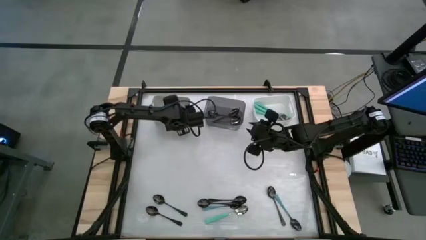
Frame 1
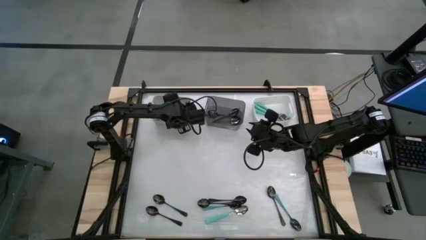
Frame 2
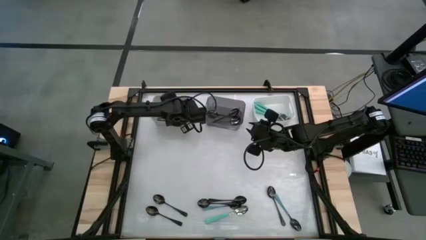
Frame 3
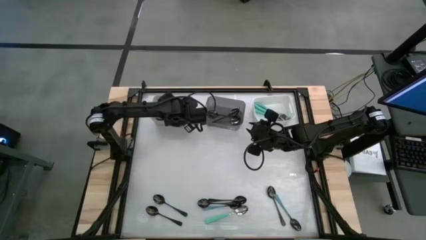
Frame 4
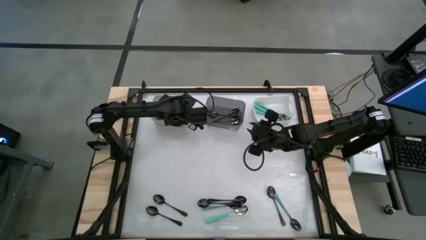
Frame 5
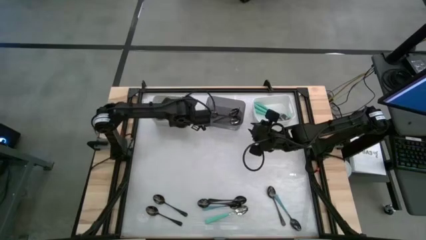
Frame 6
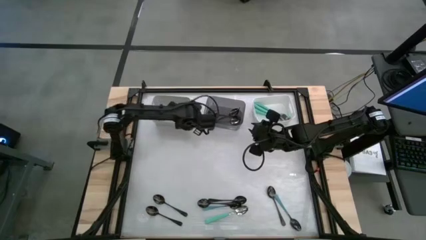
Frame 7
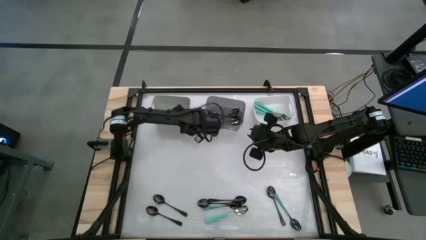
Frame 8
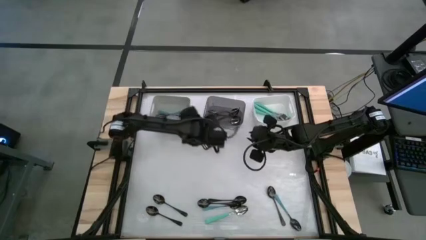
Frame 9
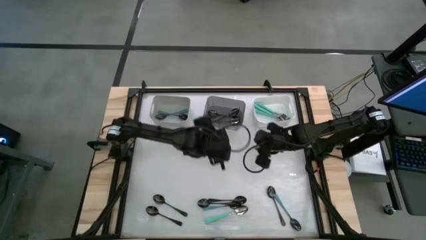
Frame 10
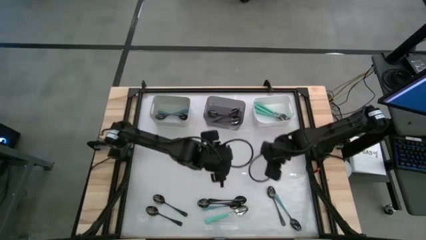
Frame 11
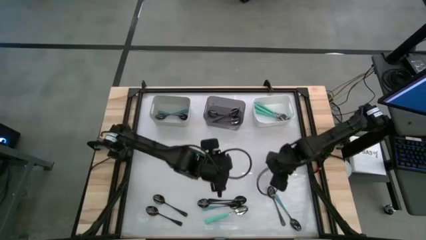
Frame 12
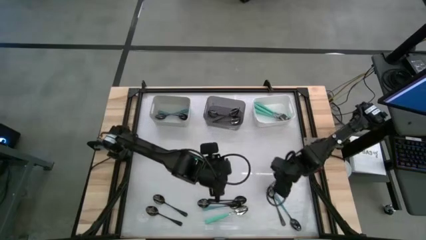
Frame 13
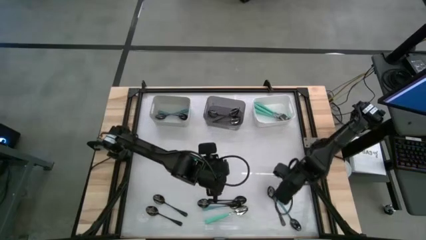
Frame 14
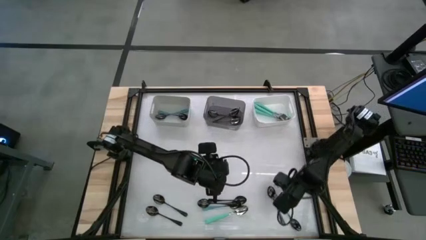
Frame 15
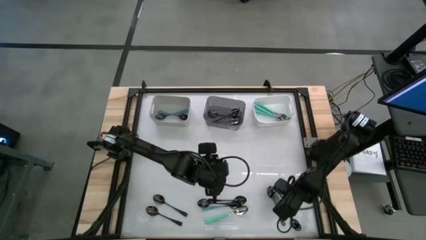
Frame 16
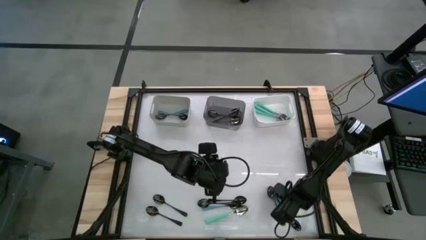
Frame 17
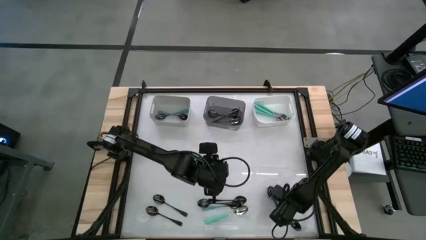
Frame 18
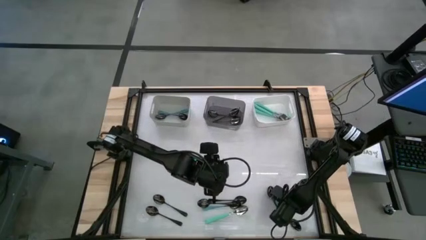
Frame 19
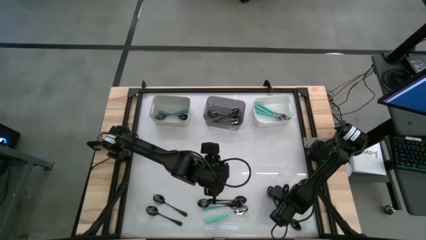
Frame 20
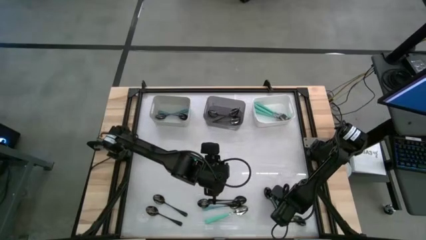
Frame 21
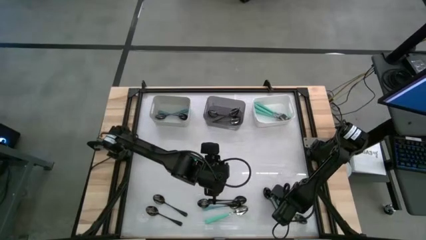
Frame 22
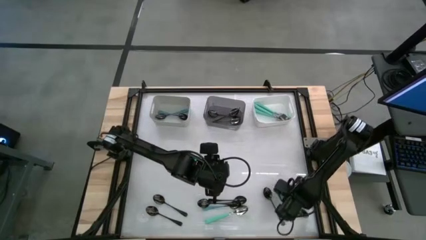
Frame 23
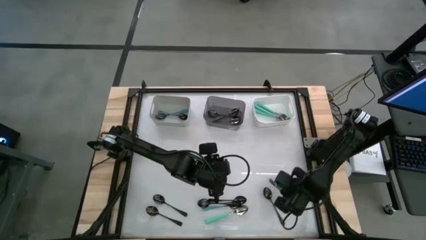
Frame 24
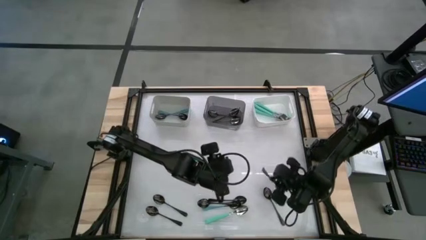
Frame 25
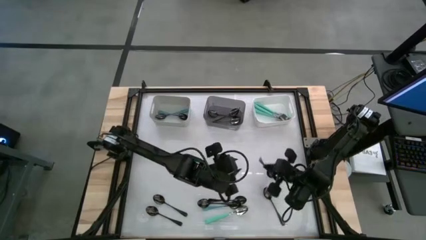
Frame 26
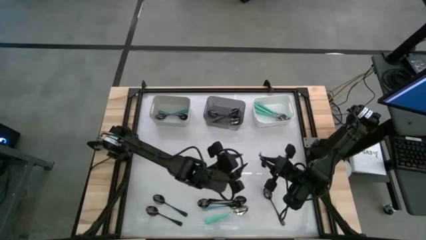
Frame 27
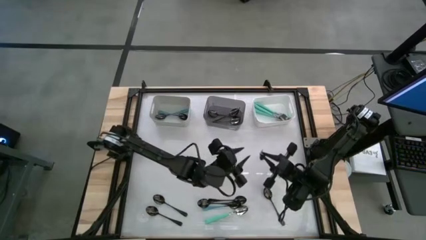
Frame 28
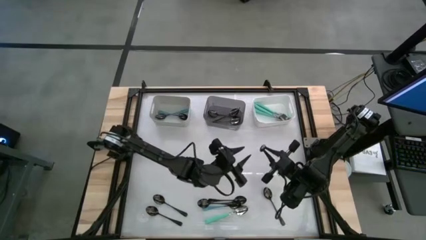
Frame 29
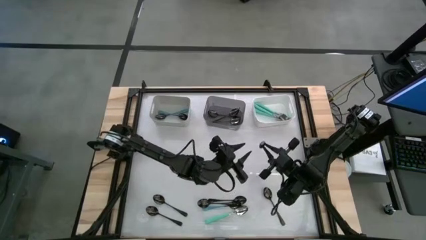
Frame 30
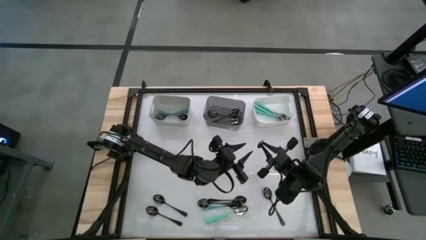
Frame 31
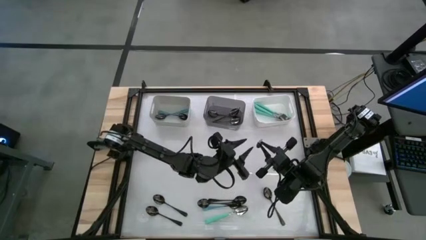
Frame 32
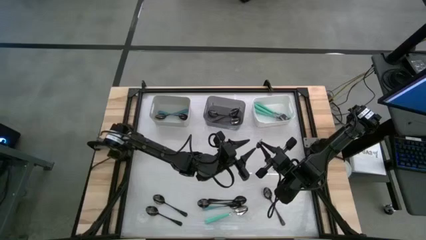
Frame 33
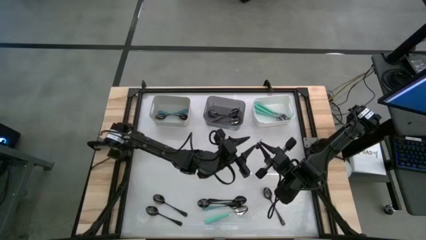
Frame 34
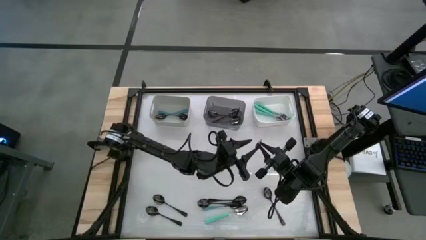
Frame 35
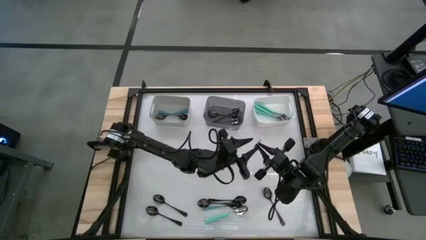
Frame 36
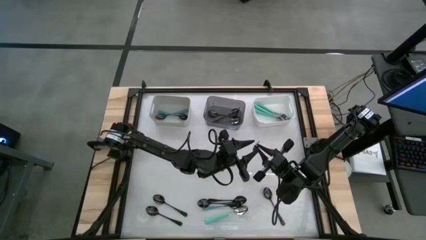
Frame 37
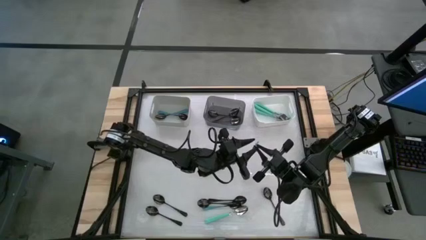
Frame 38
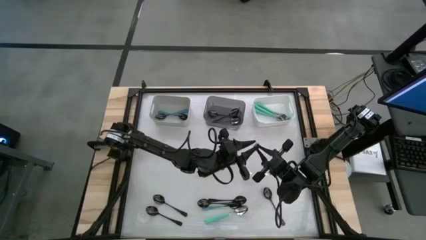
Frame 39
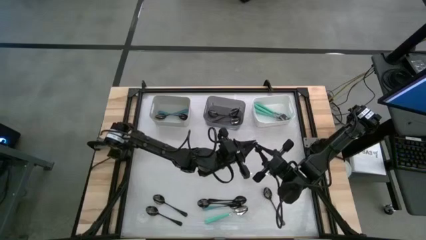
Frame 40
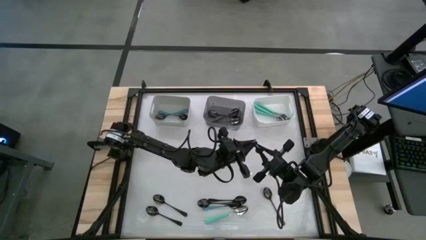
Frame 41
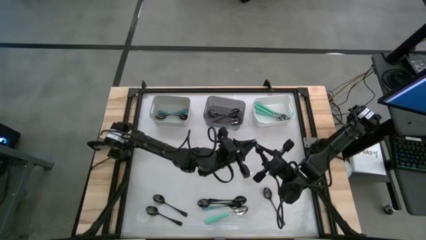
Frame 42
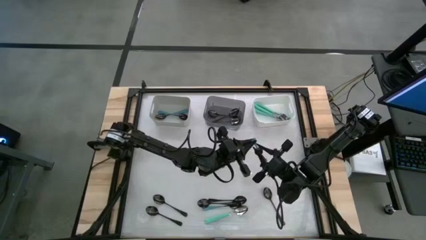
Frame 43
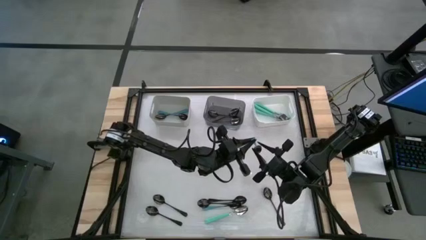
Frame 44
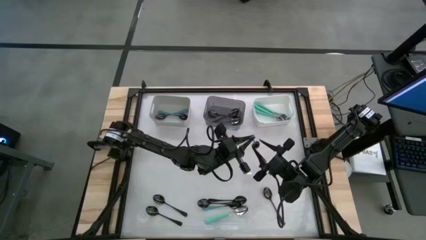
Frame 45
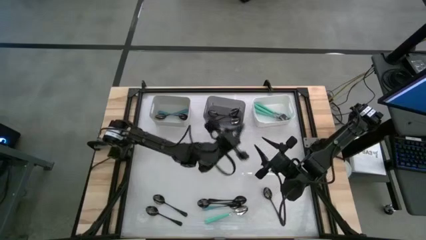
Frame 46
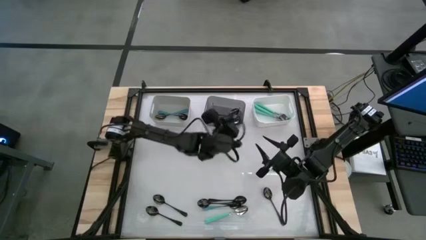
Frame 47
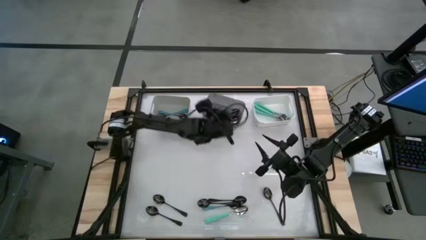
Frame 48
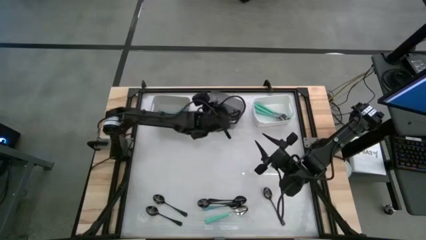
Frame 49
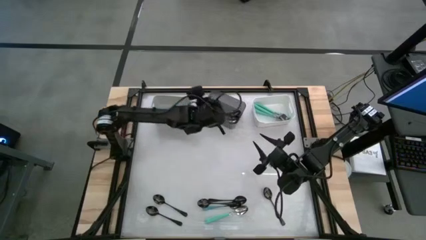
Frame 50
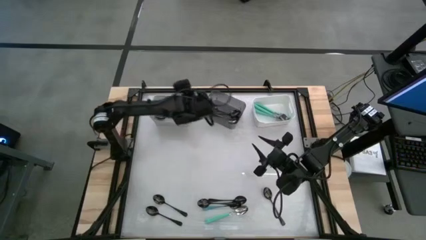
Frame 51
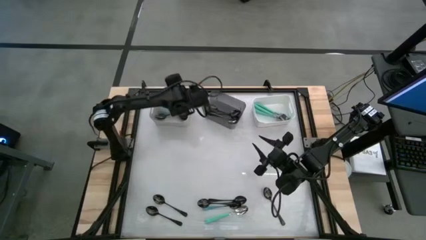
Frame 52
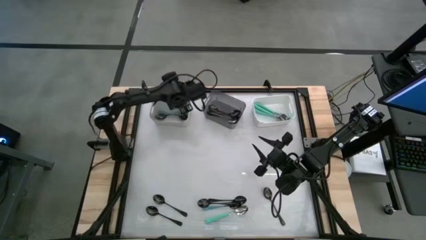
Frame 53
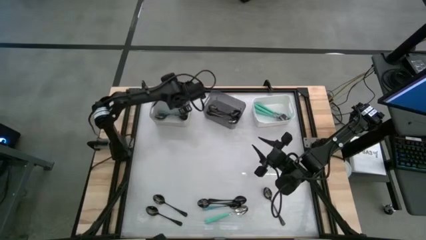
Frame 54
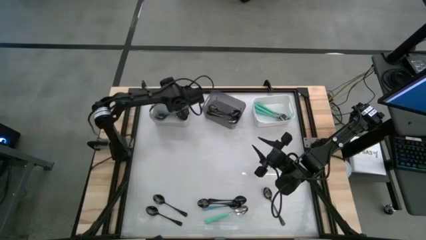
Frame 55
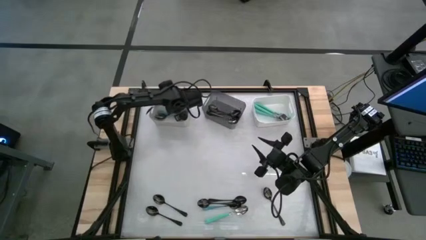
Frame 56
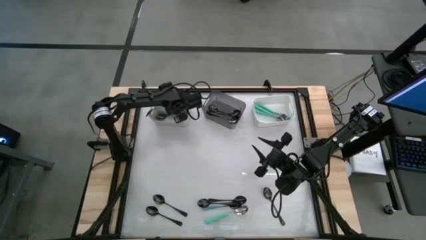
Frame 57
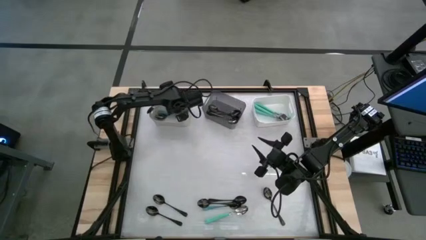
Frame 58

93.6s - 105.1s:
Task: Sort silverware by color (type)
Put the blue spoon into the gray bin

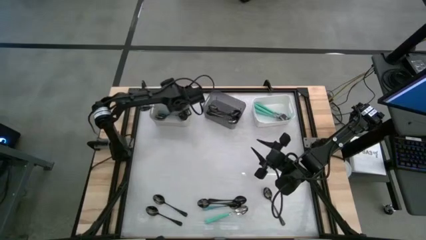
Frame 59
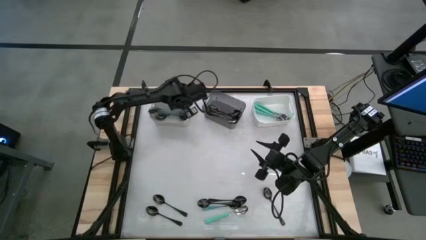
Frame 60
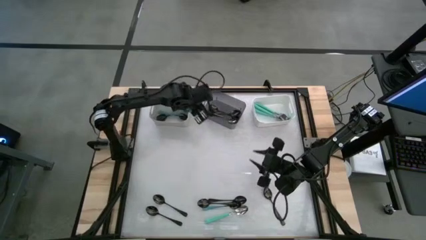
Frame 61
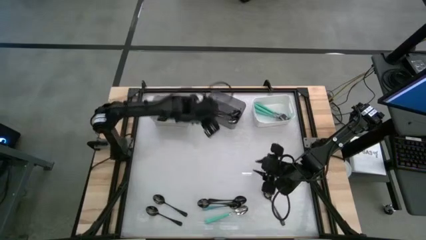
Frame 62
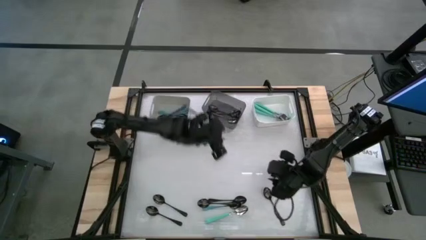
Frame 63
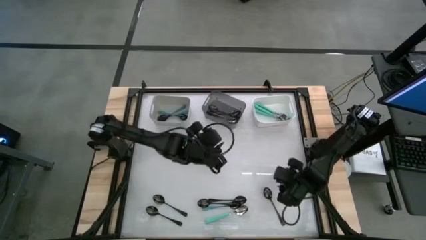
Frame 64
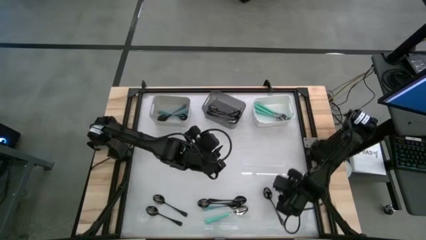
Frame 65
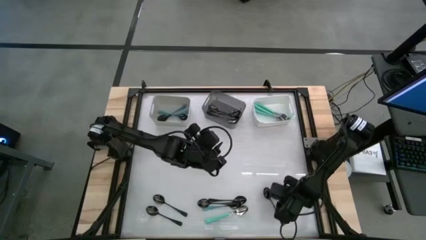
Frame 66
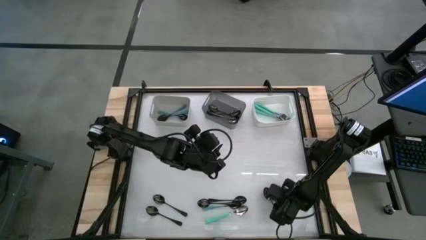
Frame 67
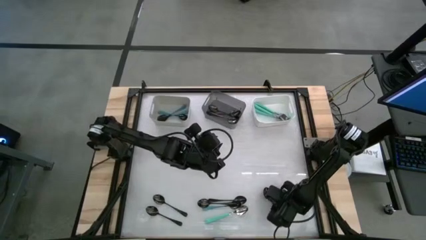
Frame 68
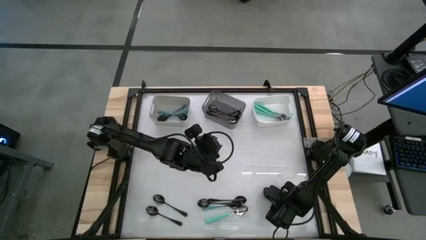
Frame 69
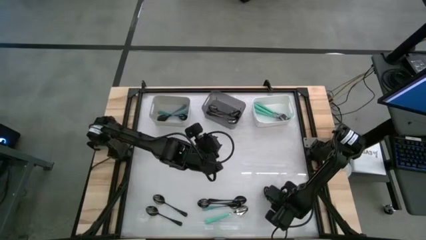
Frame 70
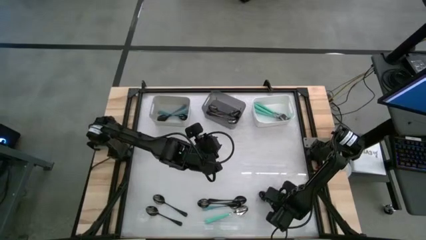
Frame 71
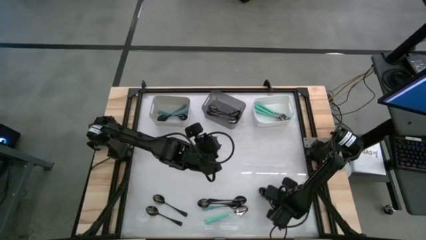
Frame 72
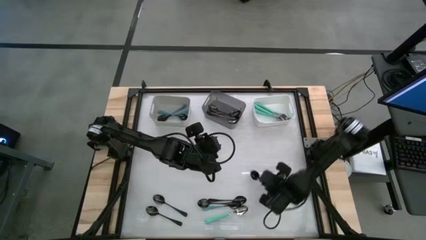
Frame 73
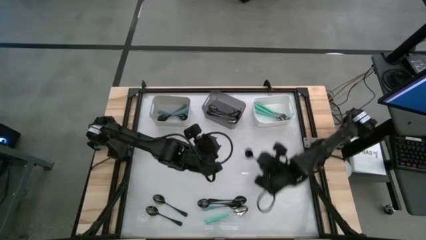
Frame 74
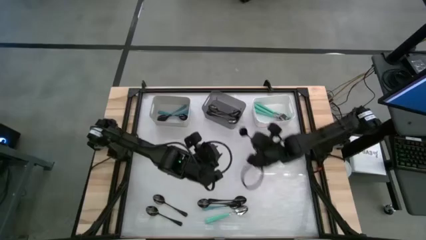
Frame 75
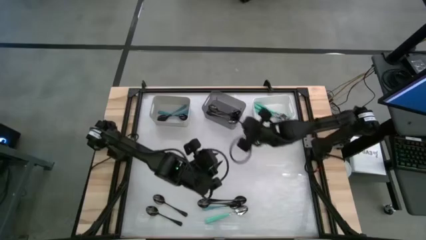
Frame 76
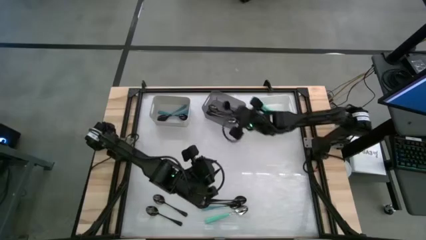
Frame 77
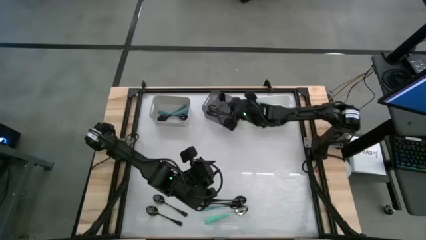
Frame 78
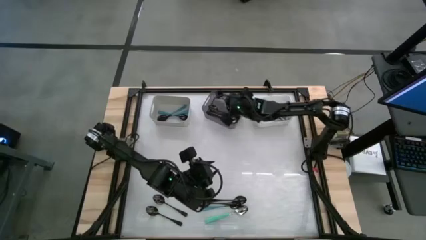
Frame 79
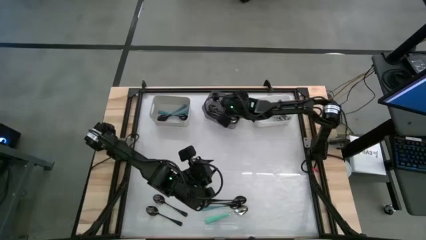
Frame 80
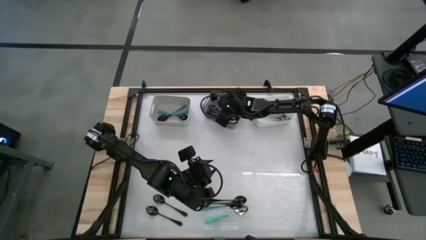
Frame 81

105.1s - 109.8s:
Put the black spoon into the black bin
